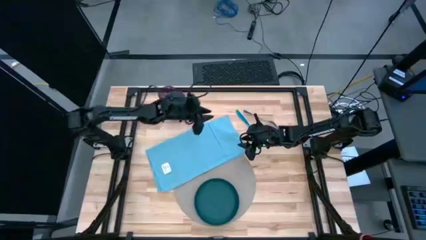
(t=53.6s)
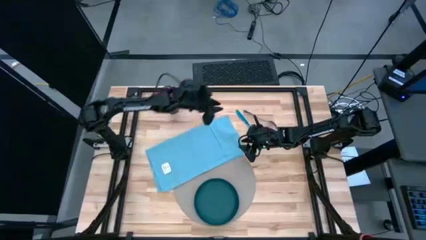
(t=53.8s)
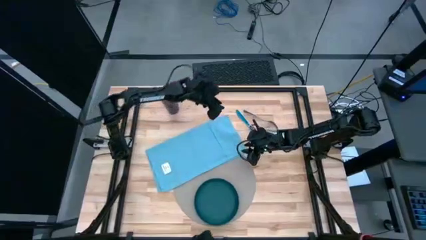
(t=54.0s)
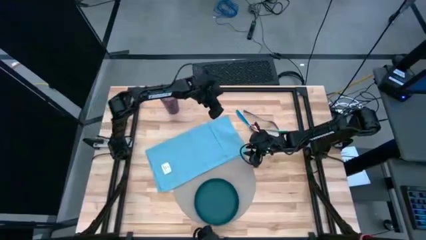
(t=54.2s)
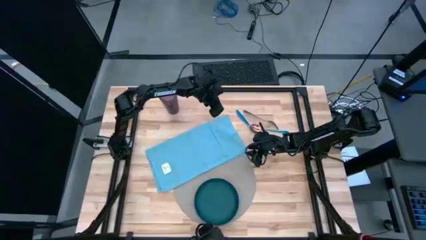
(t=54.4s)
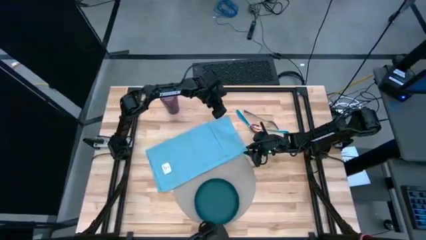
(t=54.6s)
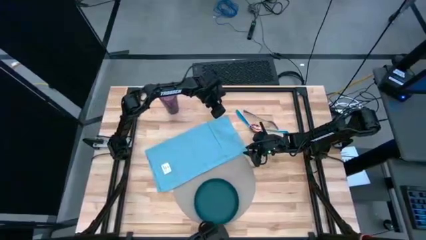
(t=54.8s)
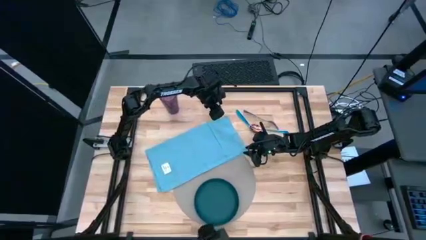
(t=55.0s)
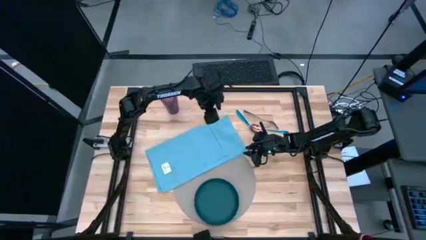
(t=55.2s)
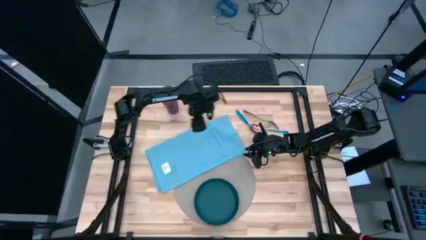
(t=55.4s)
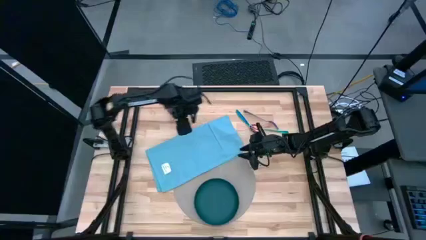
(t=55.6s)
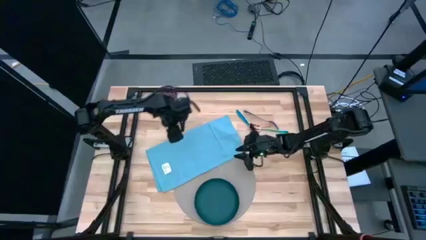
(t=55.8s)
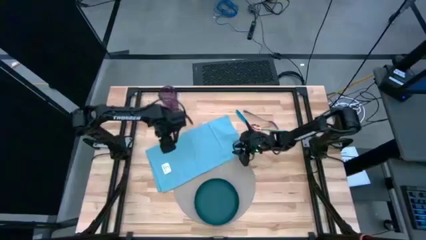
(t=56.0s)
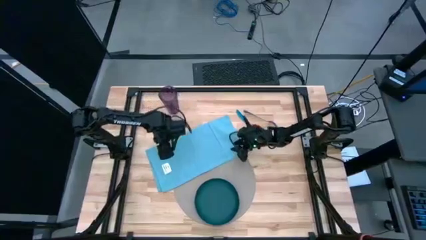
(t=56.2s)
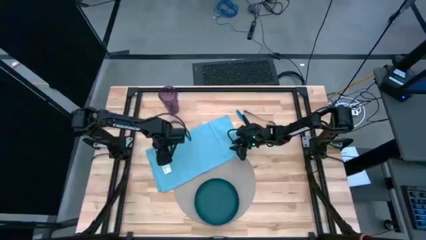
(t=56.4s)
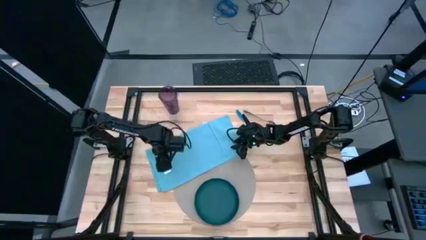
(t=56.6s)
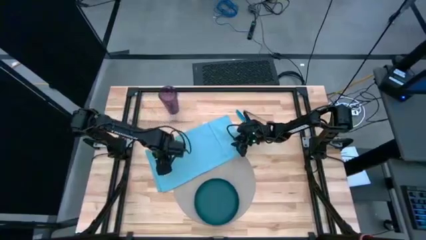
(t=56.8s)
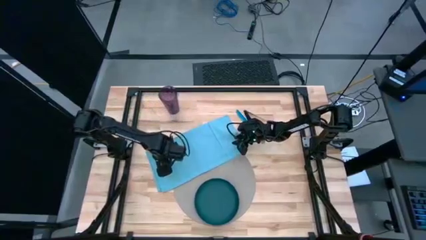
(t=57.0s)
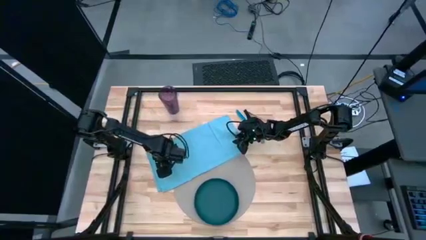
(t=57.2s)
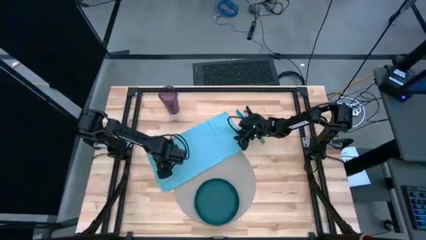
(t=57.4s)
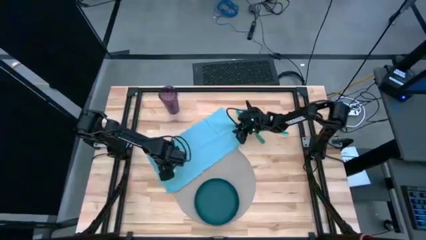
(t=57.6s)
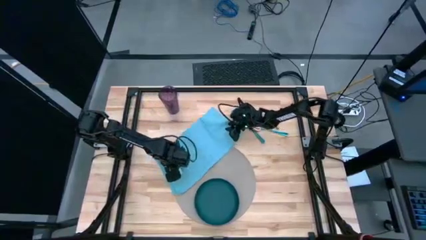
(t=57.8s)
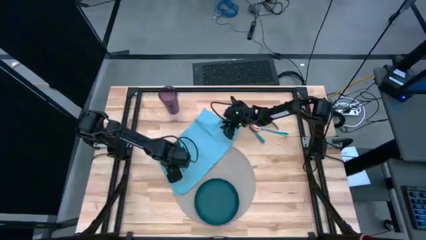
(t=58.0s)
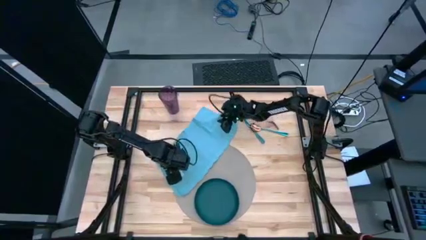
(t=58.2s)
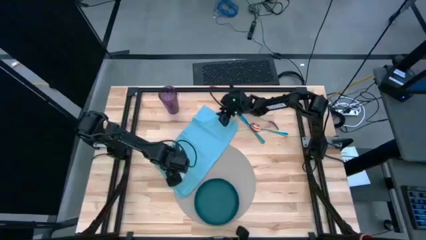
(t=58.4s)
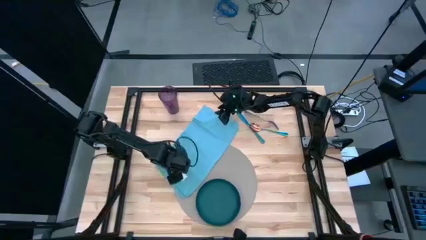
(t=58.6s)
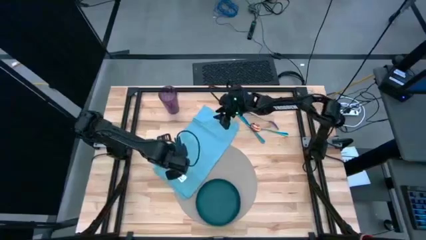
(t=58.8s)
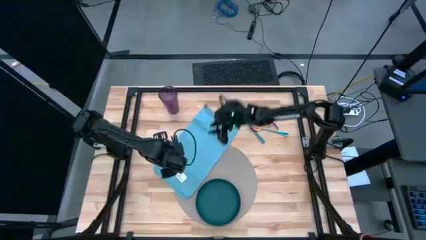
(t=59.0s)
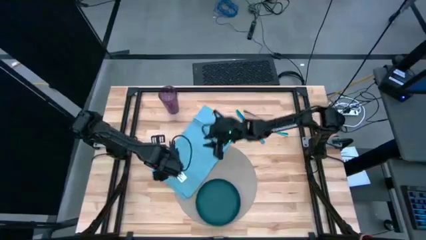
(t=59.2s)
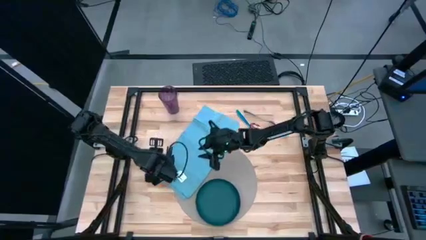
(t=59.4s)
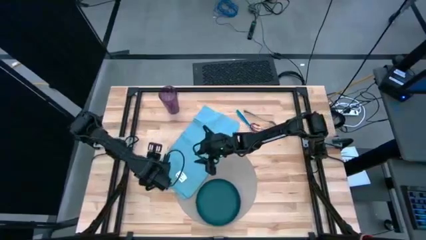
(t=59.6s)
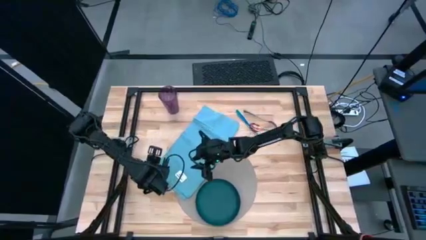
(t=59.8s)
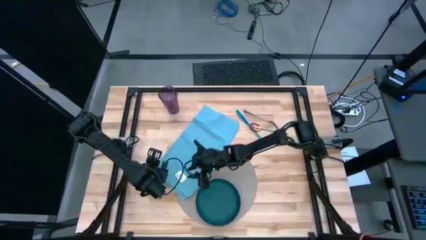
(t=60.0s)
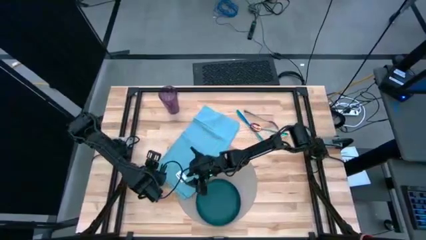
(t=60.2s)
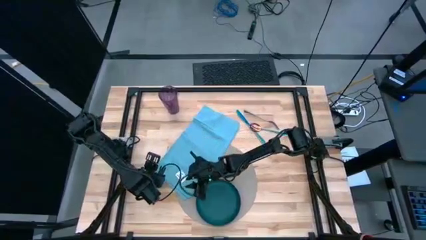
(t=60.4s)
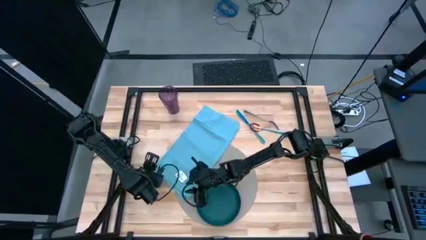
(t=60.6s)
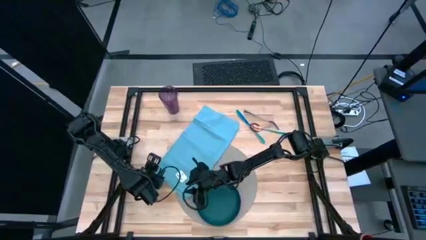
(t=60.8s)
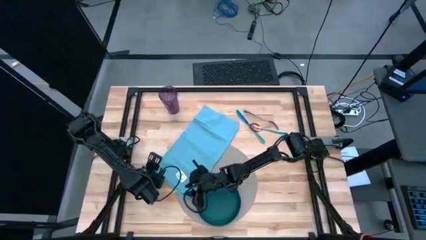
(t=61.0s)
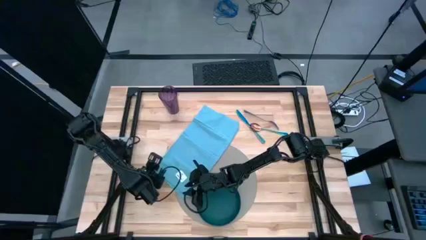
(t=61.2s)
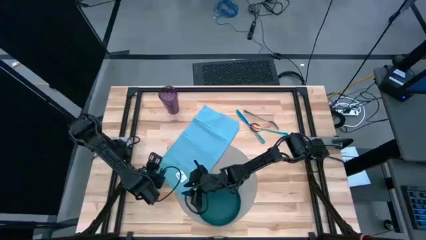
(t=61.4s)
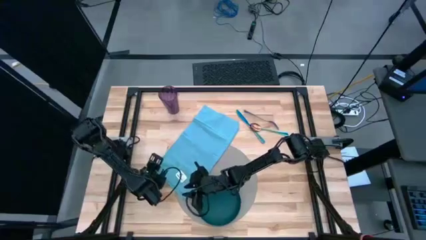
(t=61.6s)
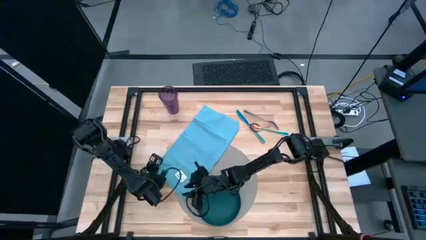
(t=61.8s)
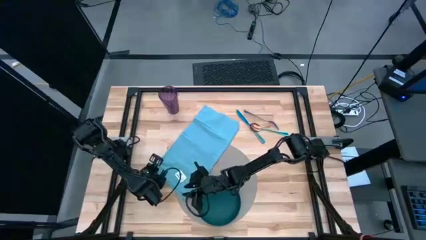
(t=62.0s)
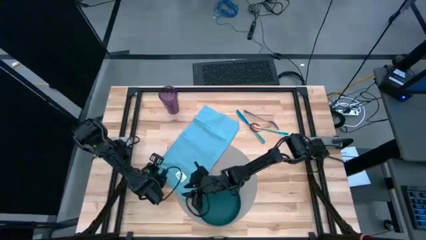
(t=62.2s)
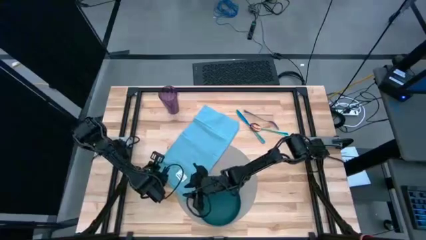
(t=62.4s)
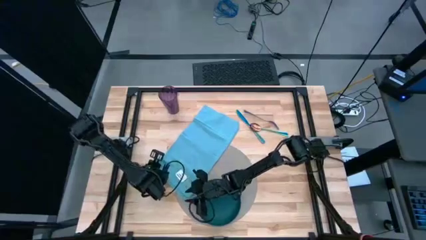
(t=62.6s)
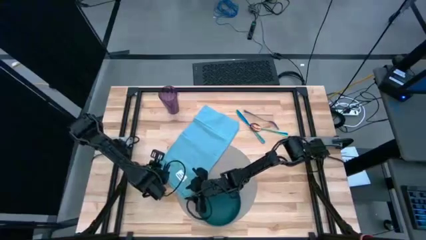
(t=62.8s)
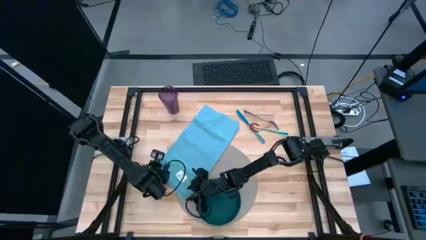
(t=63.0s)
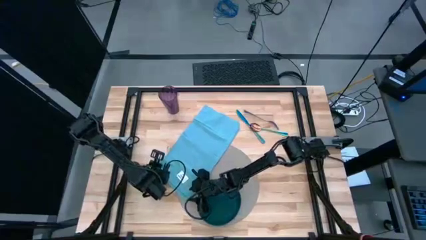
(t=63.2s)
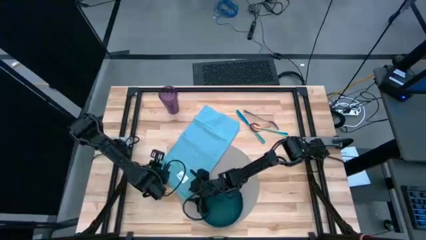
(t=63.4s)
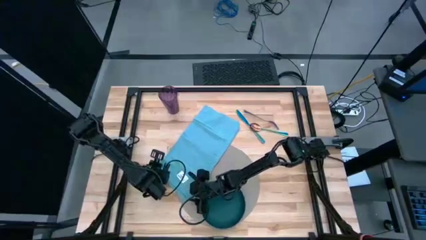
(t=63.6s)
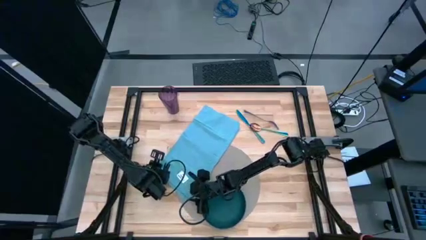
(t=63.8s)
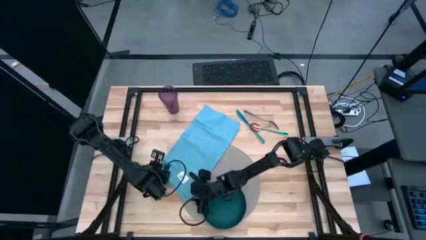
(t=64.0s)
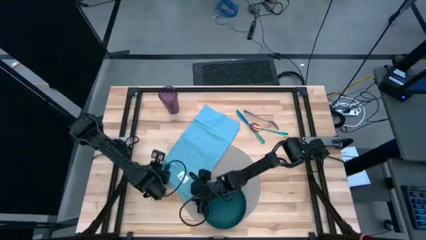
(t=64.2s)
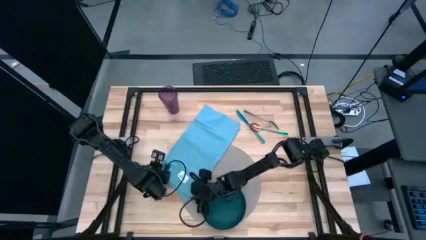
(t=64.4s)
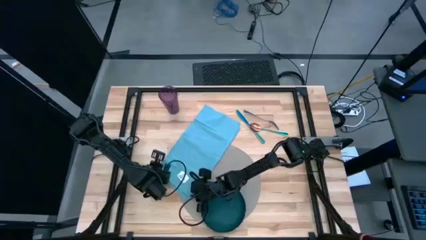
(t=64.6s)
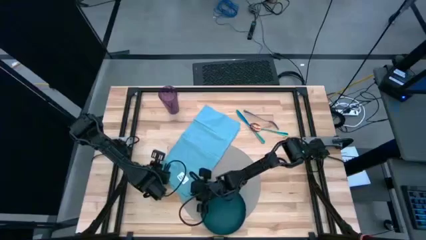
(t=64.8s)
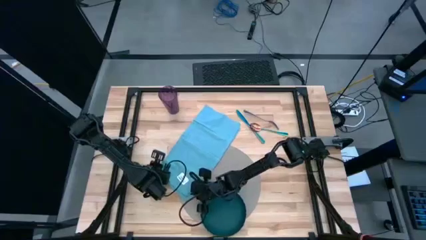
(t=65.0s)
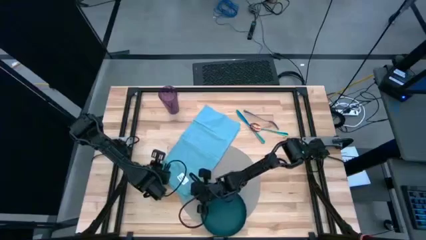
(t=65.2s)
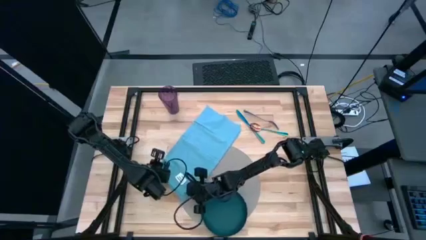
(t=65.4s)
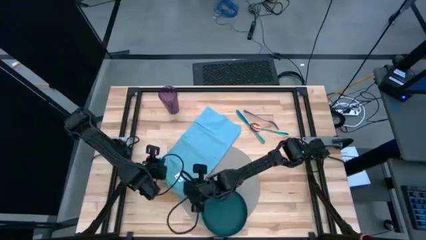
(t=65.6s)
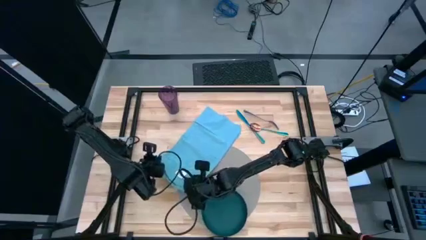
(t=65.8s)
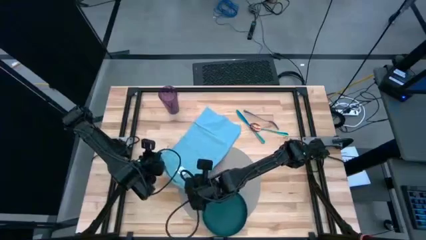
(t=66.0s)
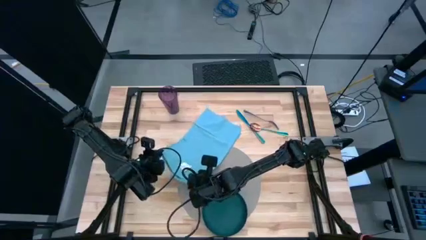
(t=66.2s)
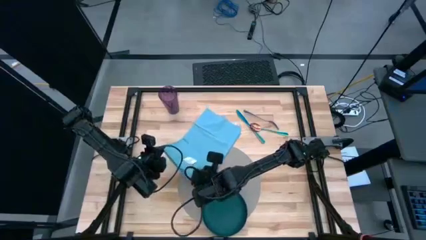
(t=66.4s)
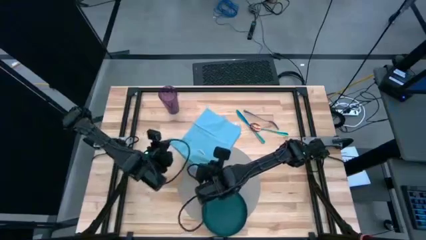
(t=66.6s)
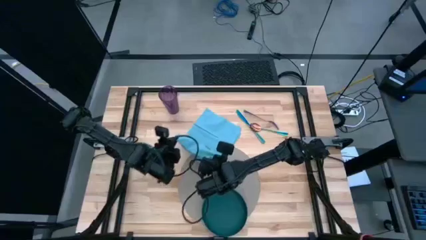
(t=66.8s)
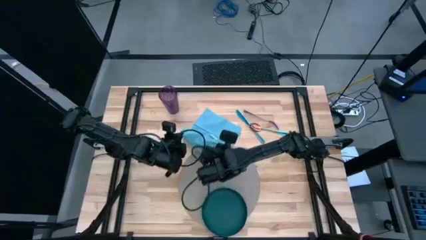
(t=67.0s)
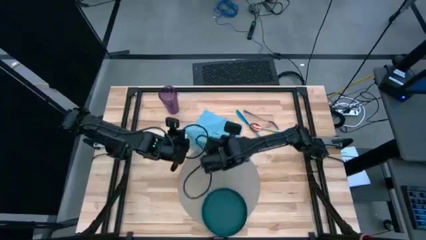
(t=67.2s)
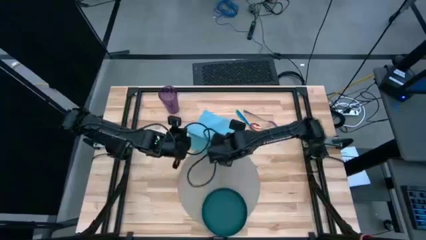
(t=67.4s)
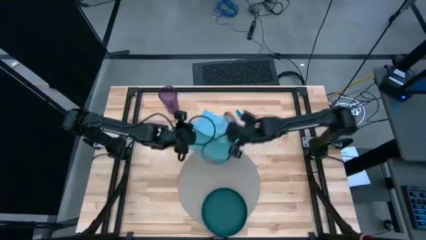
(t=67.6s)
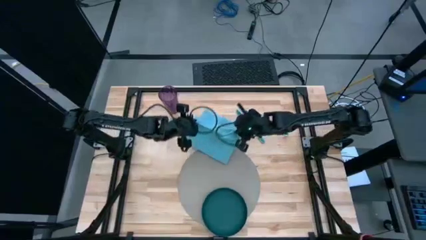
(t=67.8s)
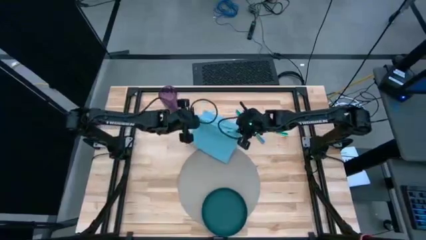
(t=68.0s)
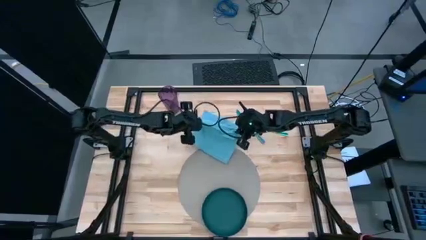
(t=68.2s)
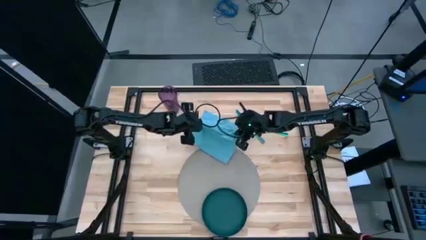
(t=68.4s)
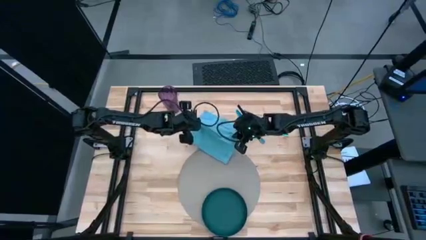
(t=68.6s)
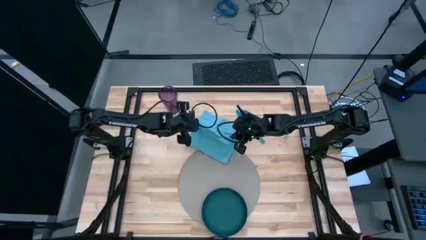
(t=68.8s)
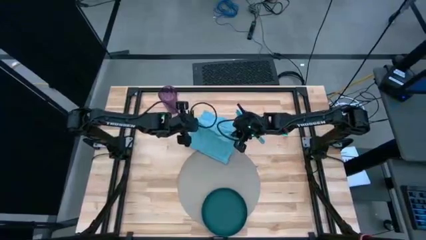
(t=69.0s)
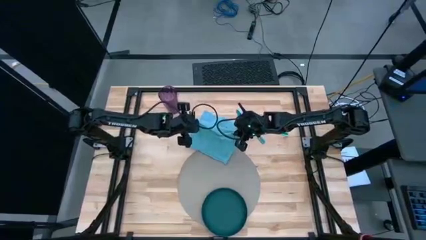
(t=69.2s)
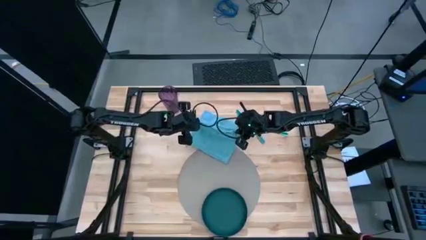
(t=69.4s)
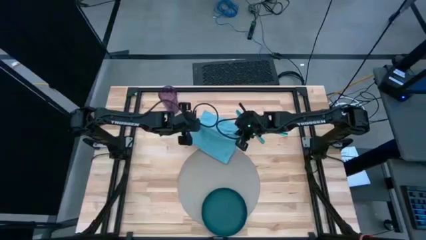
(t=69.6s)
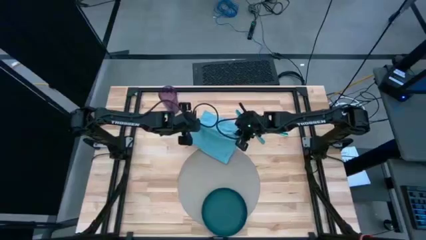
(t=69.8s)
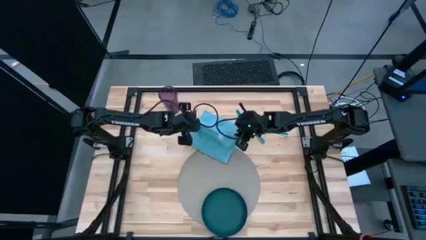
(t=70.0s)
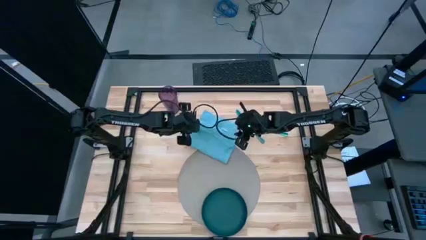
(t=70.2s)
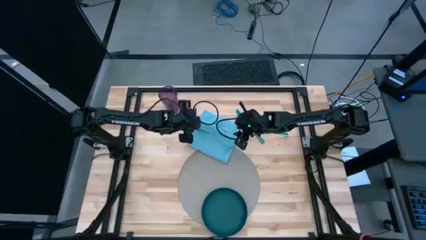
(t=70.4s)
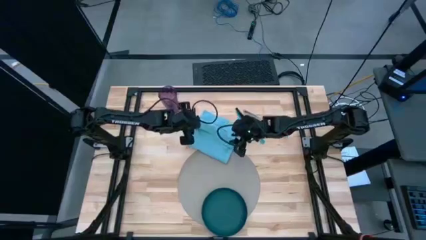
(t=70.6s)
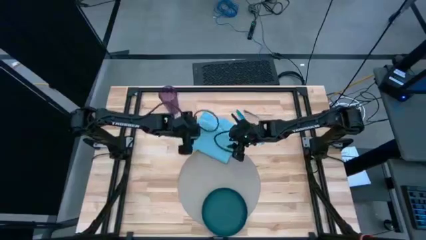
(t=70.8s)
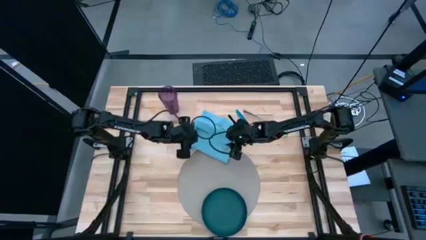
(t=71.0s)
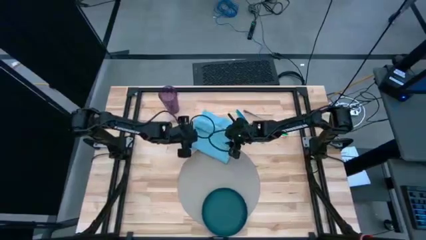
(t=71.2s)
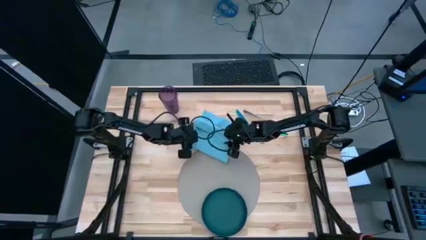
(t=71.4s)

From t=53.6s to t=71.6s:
Task: Set table place
Fold the blue table napkin
